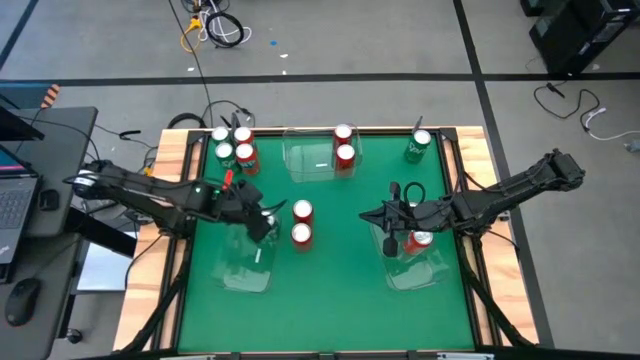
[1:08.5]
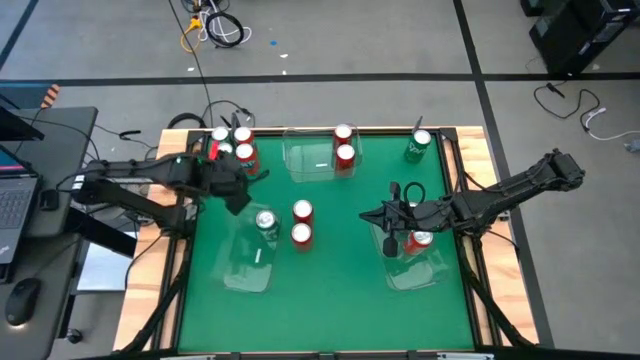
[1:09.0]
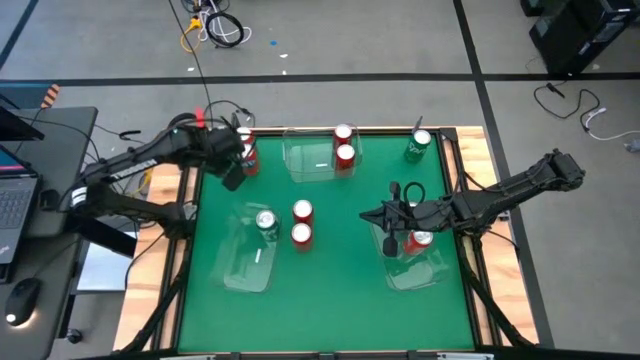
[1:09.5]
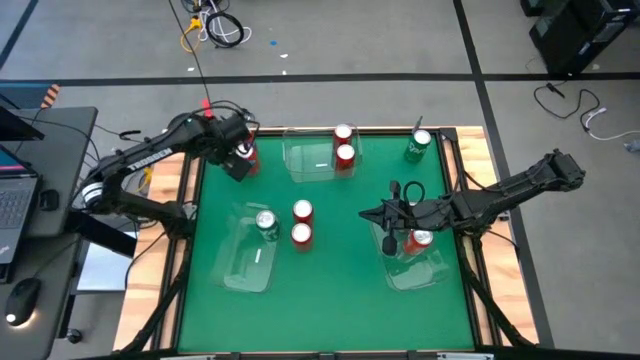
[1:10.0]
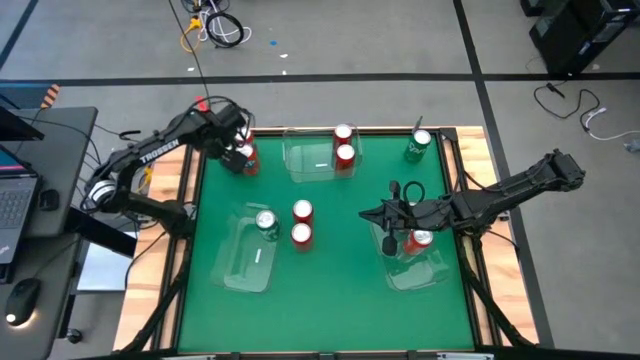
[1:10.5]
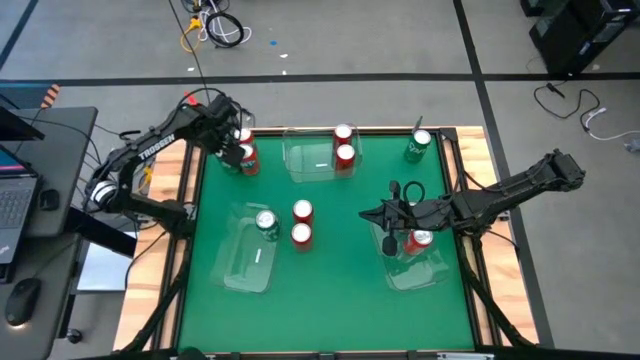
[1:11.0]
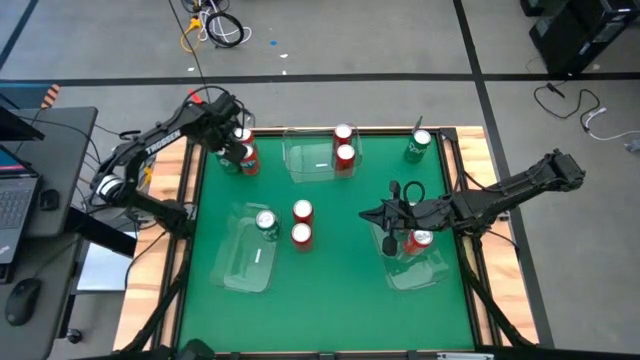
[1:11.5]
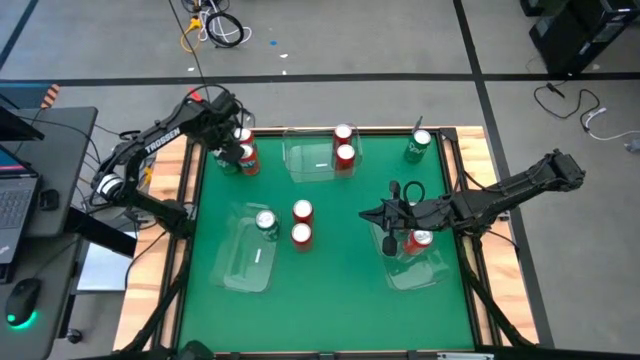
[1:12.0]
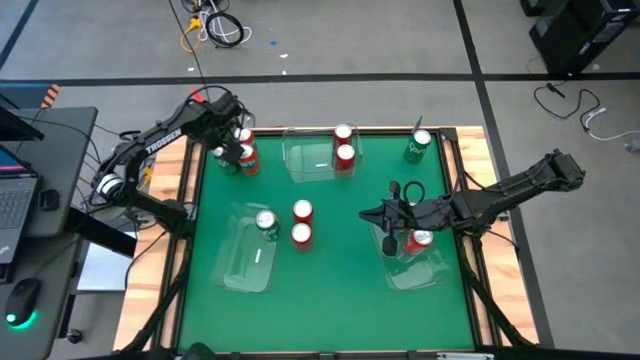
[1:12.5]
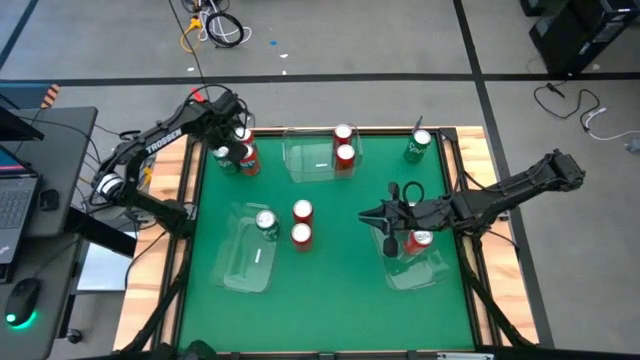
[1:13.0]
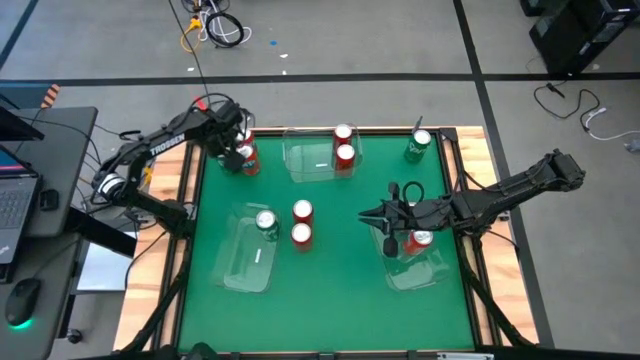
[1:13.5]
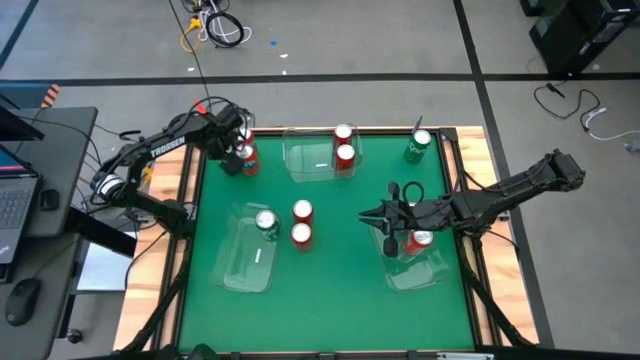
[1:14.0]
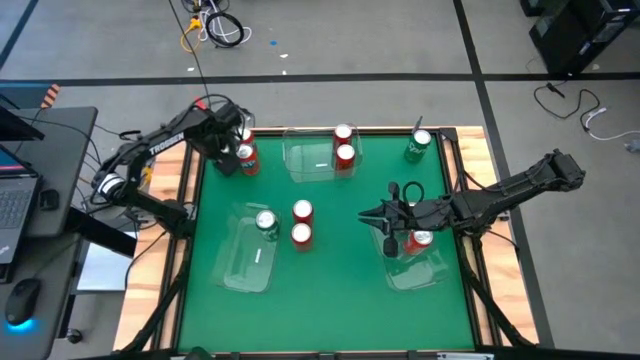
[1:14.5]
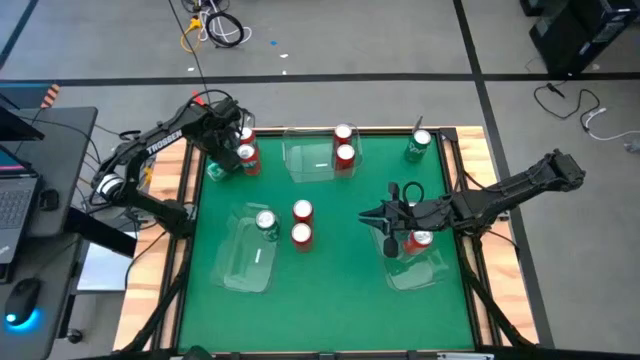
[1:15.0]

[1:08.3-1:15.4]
Task: Sort soda cans
Put the green soda can into the middle left transparent bin

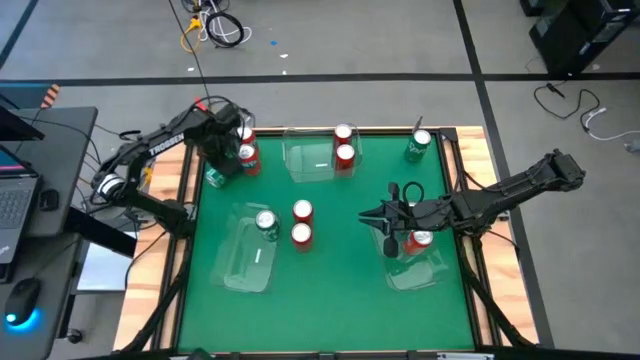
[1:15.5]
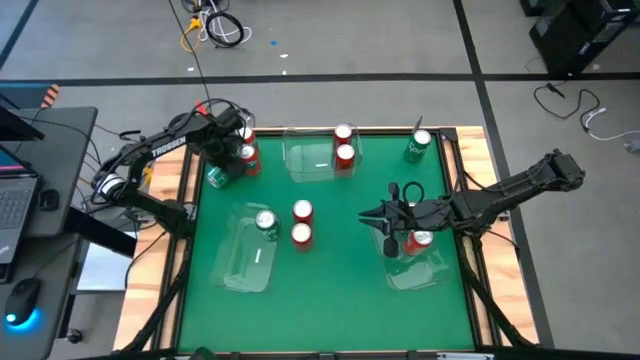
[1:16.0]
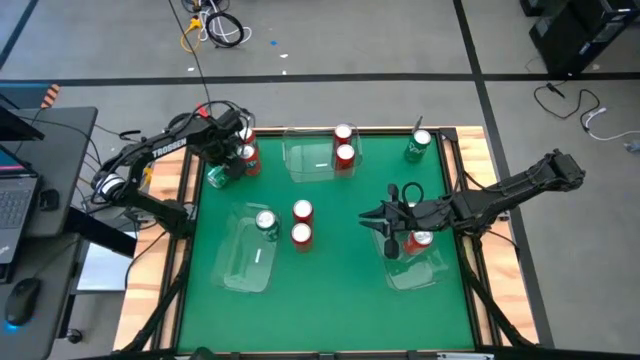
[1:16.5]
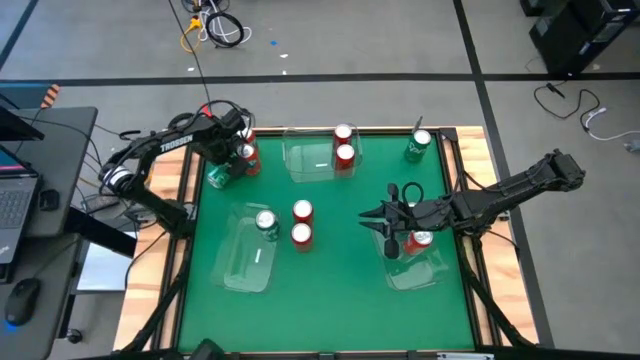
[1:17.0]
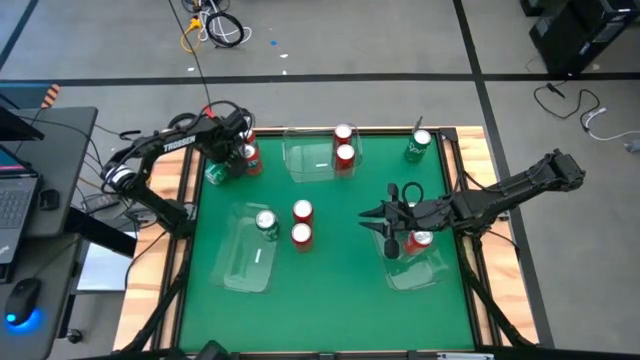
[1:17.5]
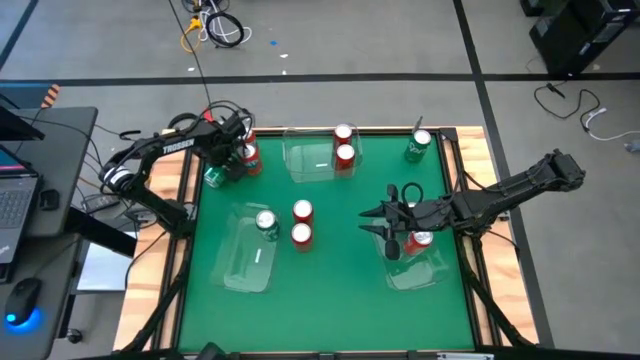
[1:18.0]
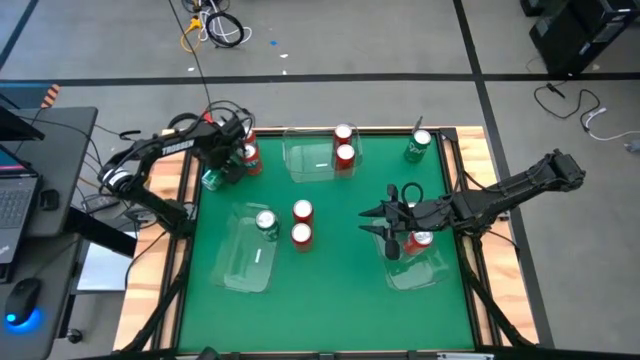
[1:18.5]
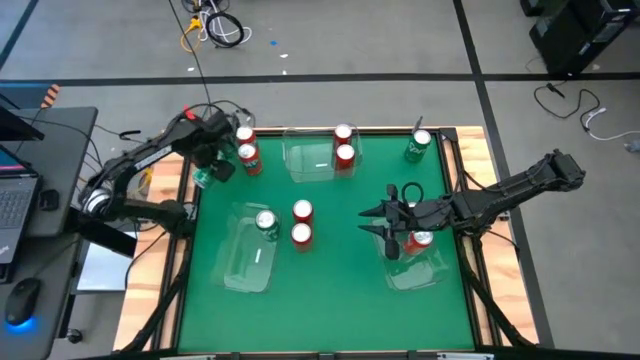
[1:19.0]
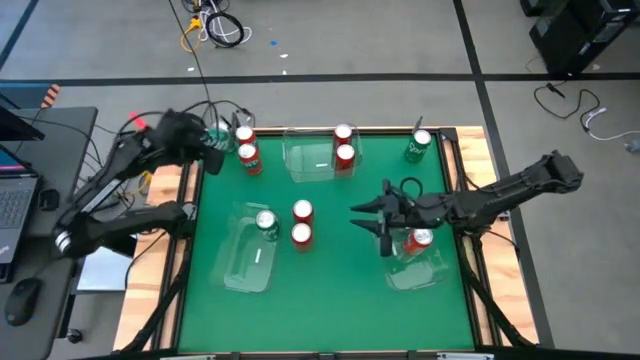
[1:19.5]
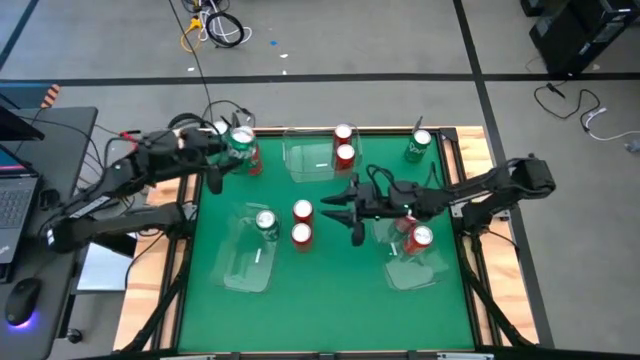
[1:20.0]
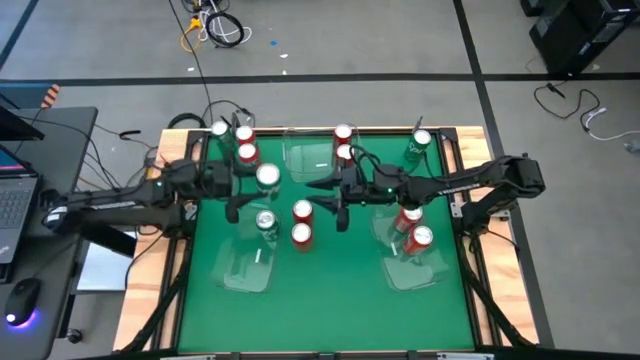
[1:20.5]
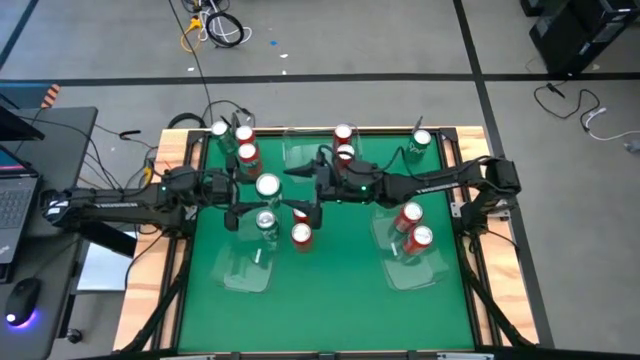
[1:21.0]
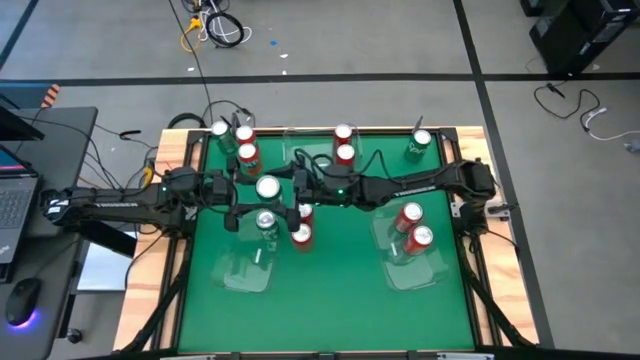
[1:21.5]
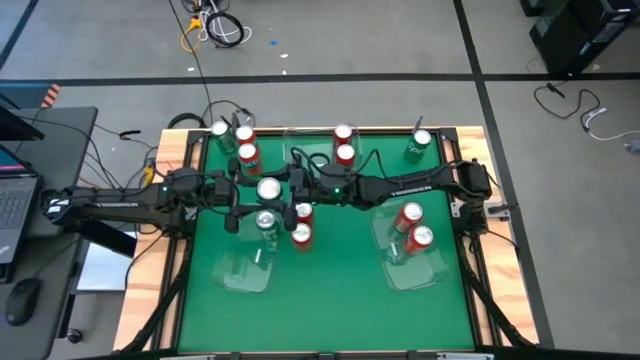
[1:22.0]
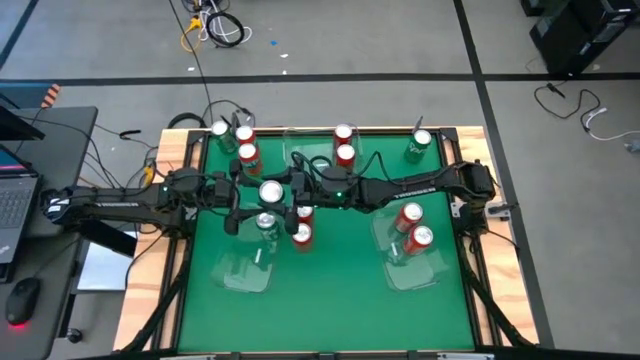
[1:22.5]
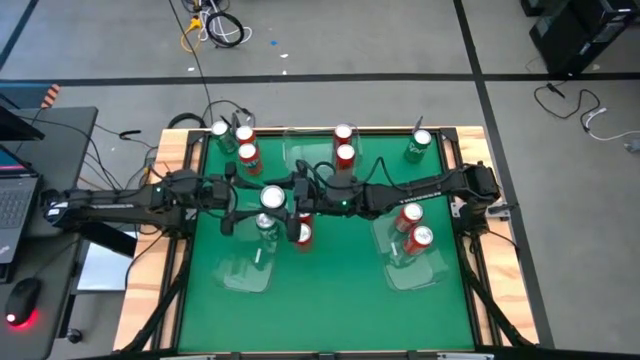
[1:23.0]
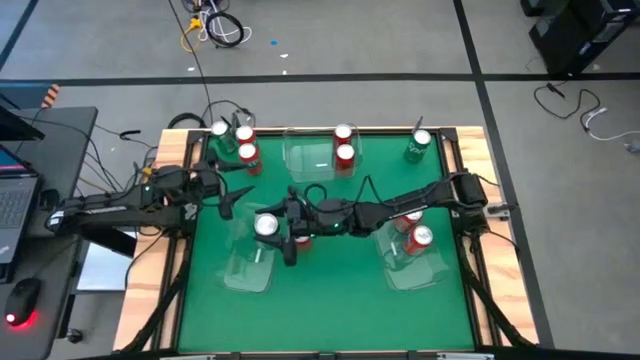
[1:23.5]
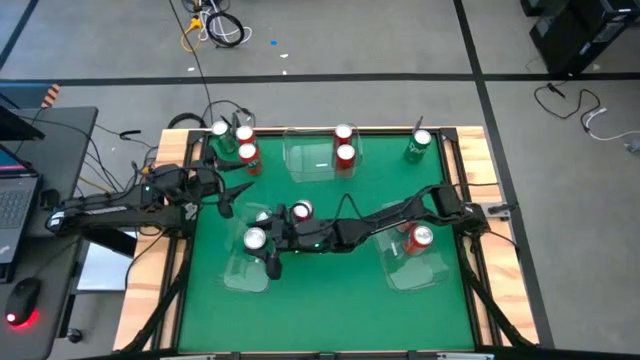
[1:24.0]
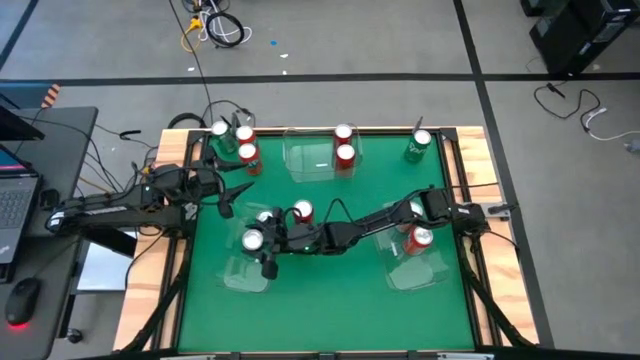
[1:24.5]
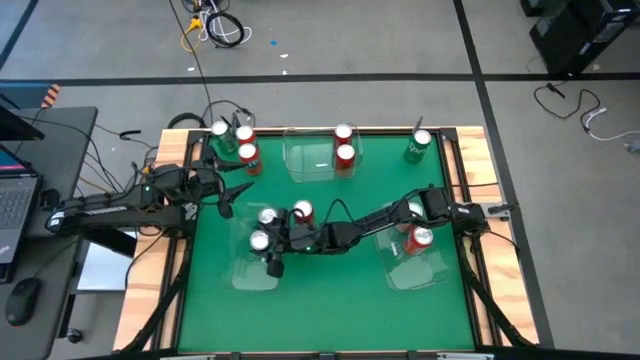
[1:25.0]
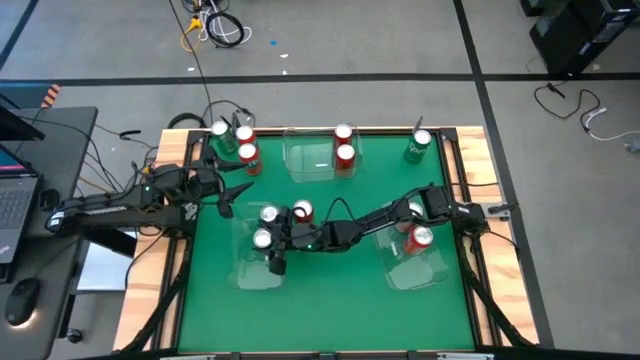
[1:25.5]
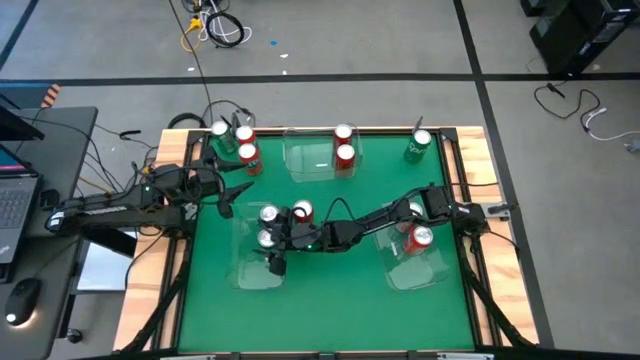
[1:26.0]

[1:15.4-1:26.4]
Put the green soda can into the middle left transparent bin
